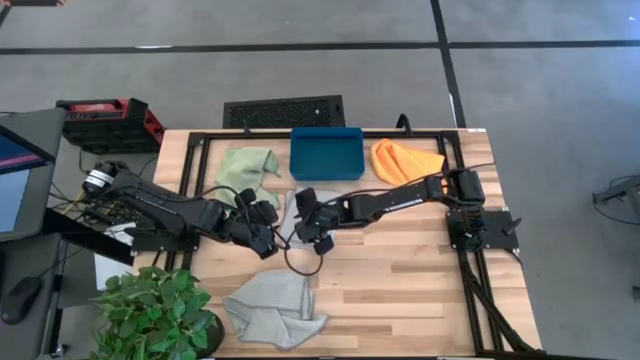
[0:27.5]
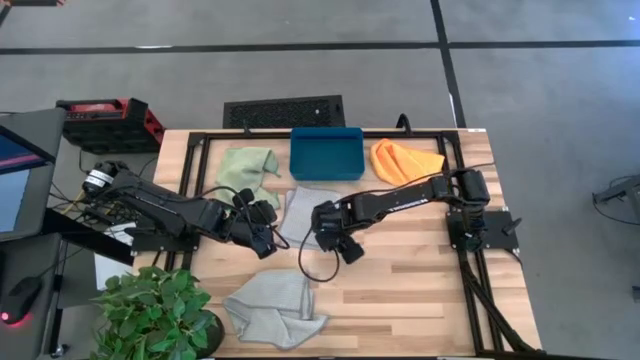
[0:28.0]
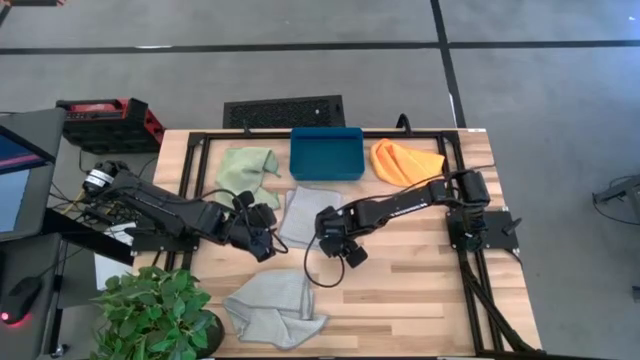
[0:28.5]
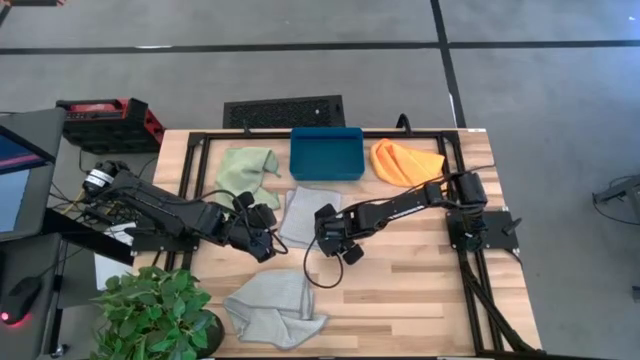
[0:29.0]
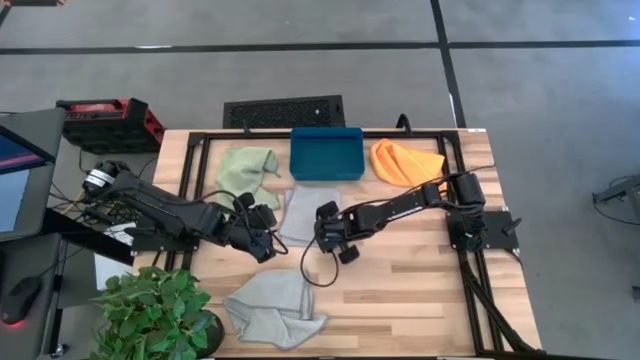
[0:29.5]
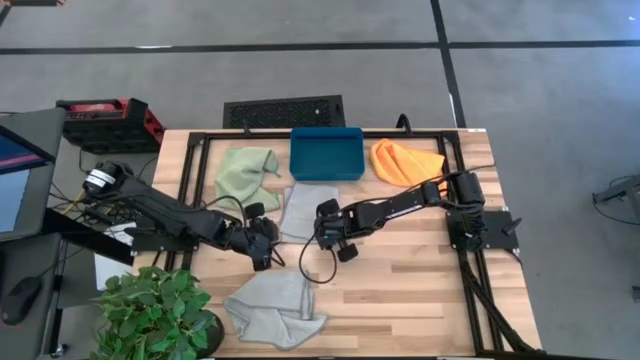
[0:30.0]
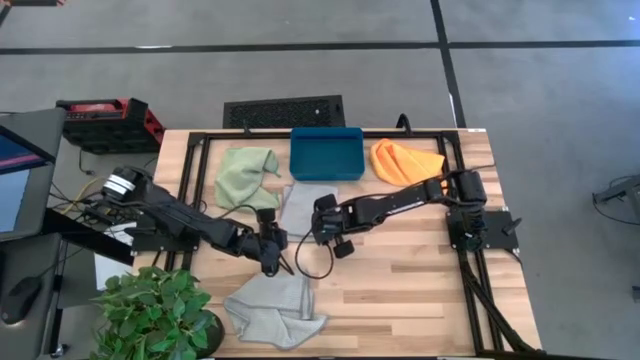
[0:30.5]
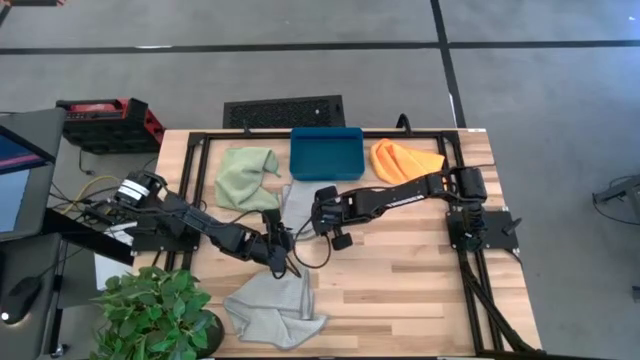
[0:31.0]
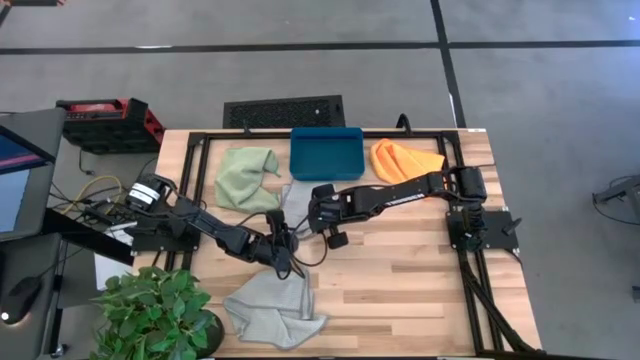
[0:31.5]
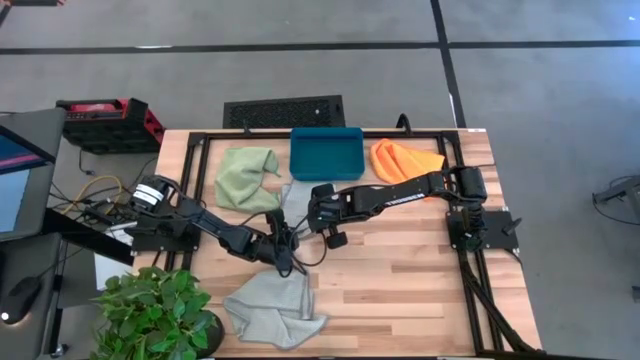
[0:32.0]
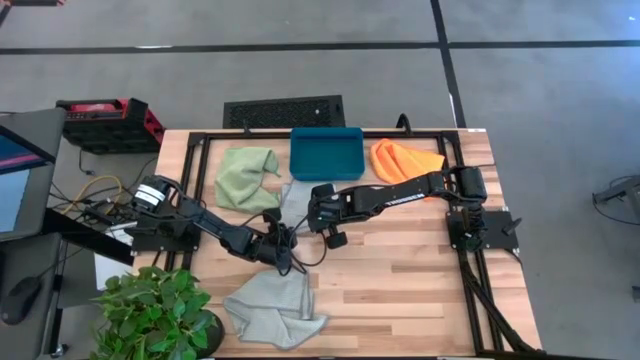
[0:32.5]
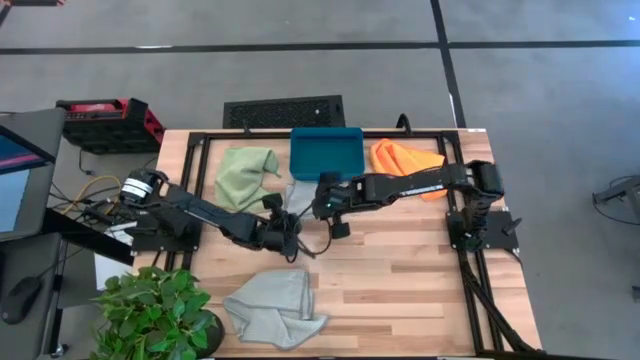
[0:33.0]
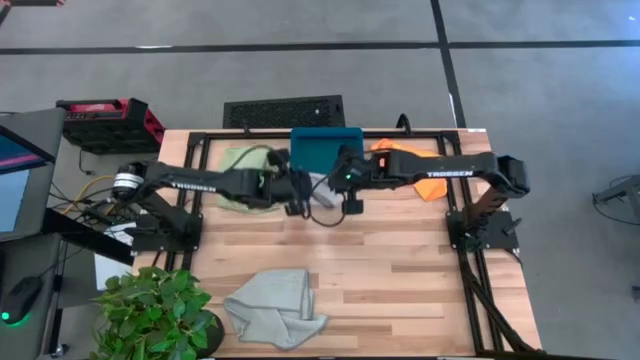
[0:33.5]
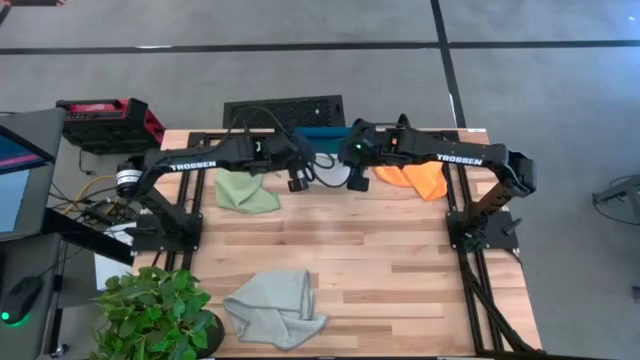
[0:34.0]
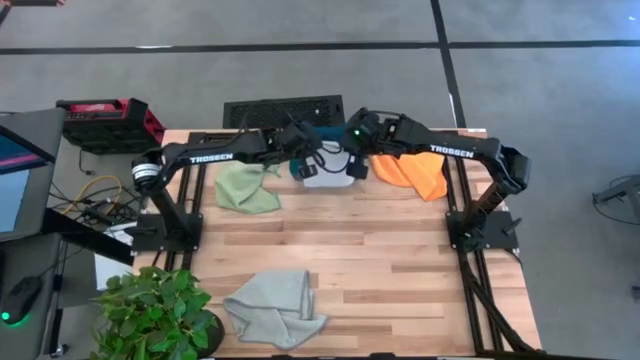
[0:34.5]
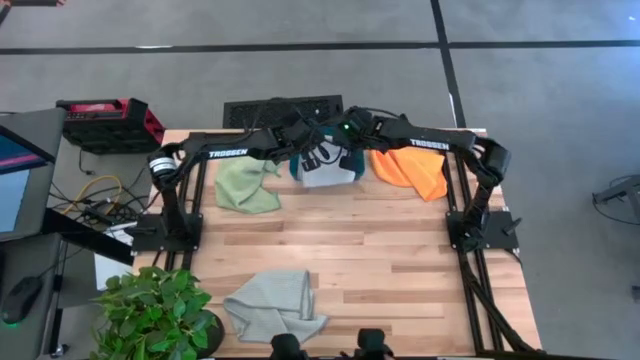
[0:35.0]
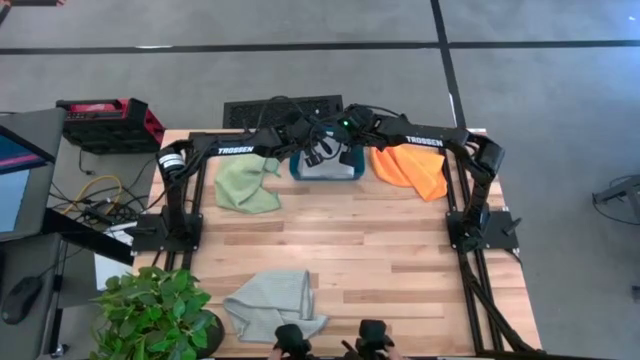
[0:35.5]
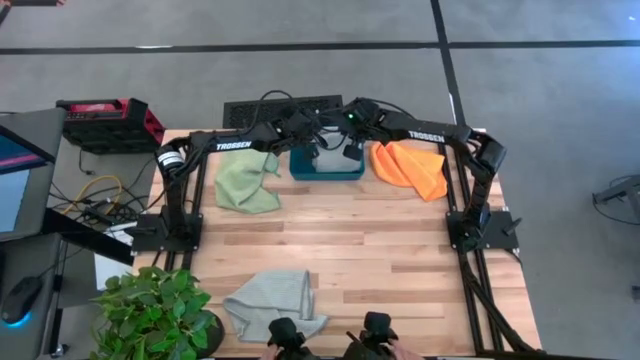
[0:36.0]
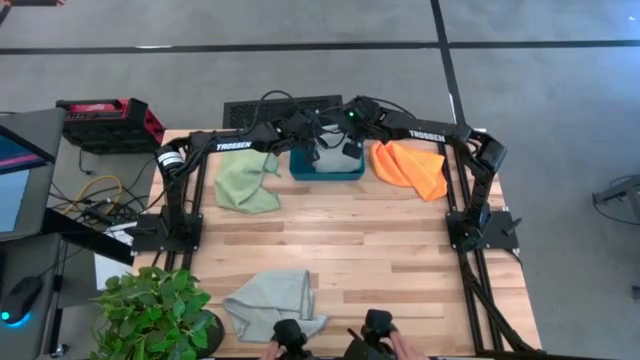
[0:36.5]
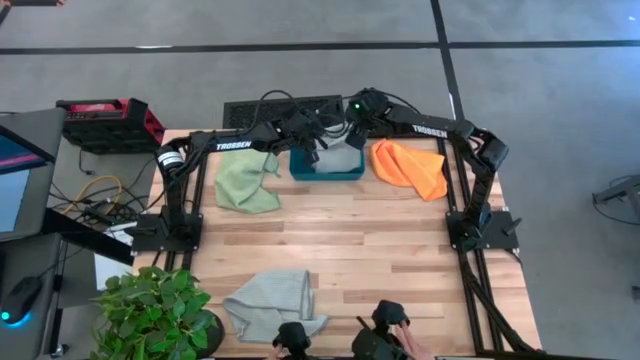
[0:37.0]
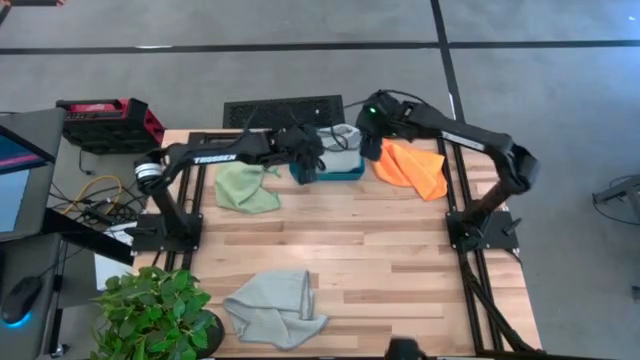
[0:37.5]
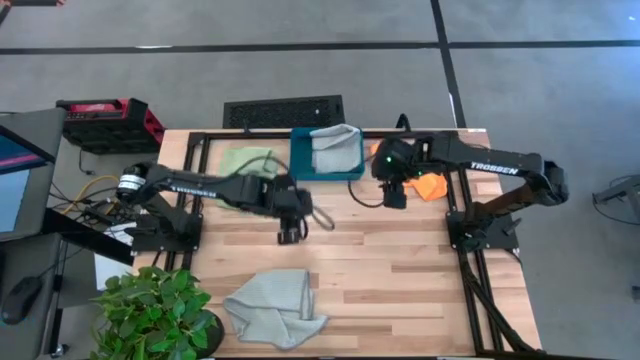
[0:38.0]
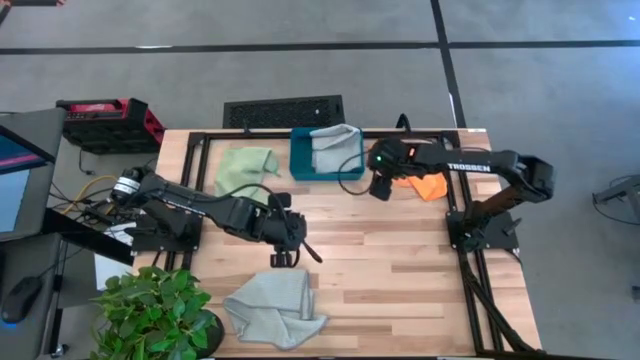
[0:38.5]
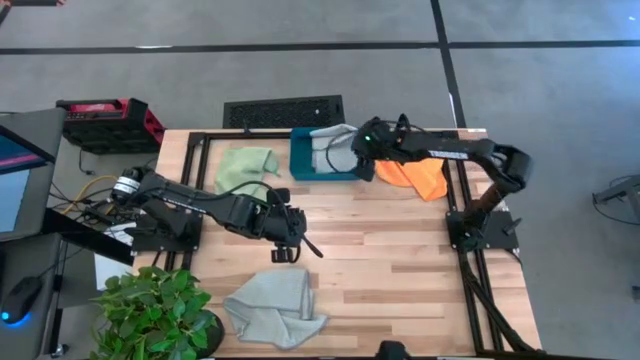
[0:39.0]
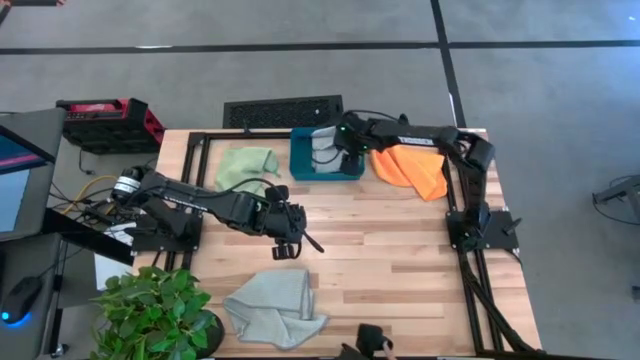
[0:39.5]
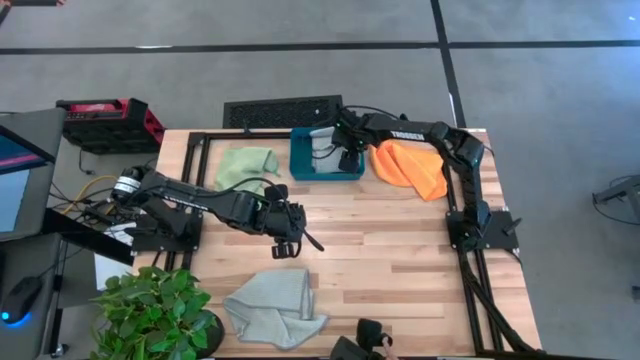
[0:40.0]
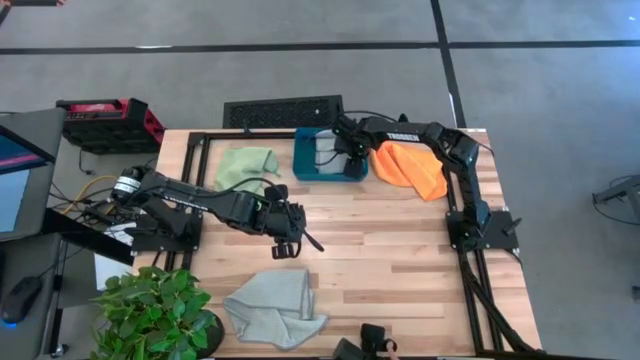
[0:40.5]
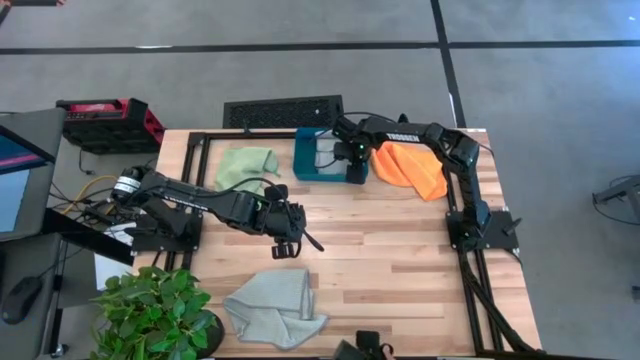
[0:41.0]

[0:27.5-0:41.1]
Task: Fold microfiber towels
Put the folded gray towel into the blue bin
